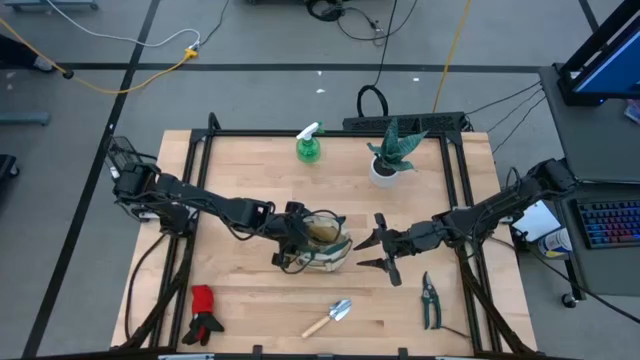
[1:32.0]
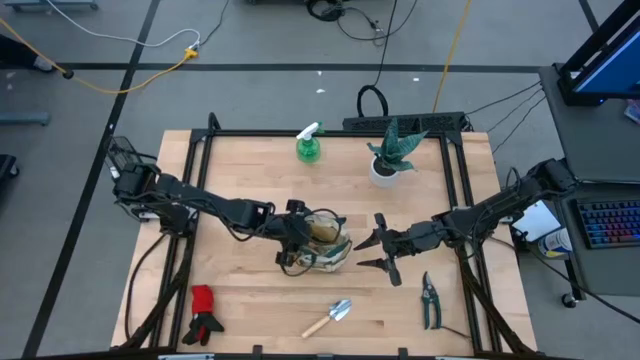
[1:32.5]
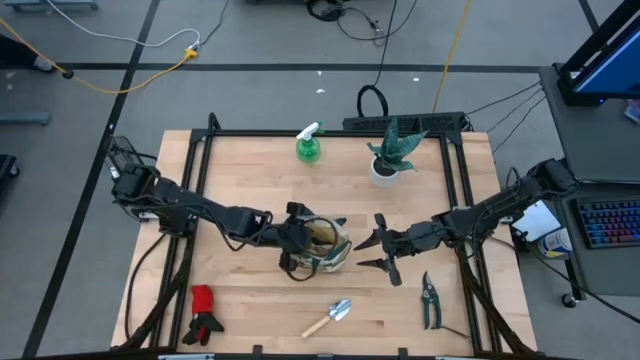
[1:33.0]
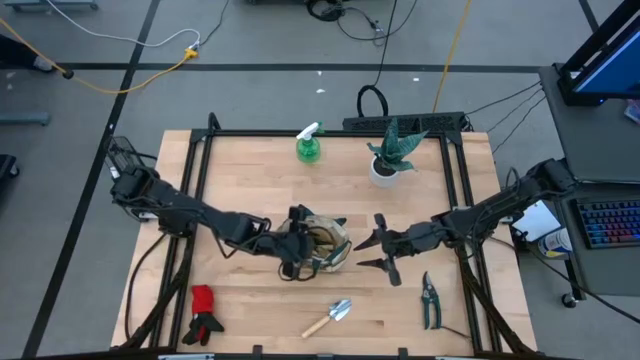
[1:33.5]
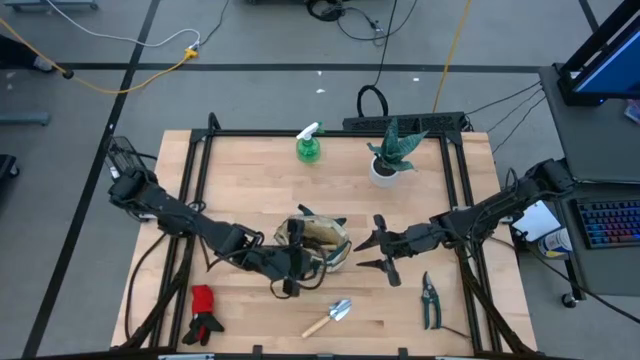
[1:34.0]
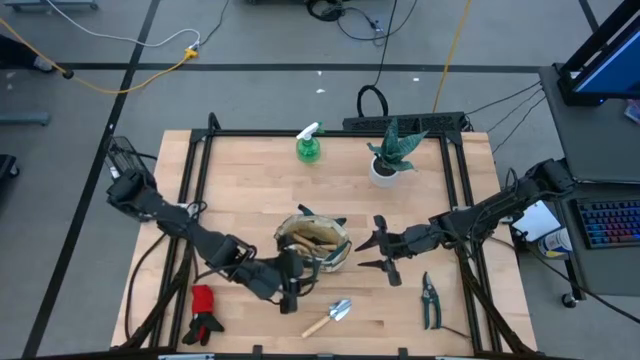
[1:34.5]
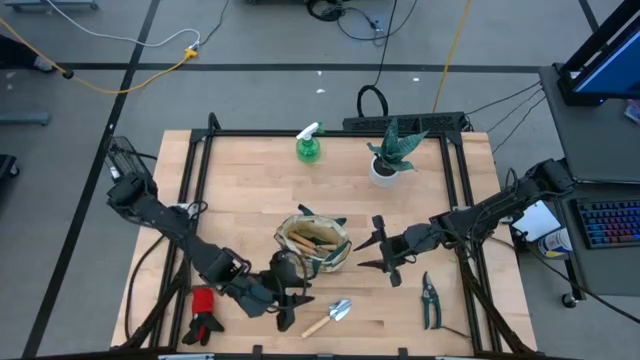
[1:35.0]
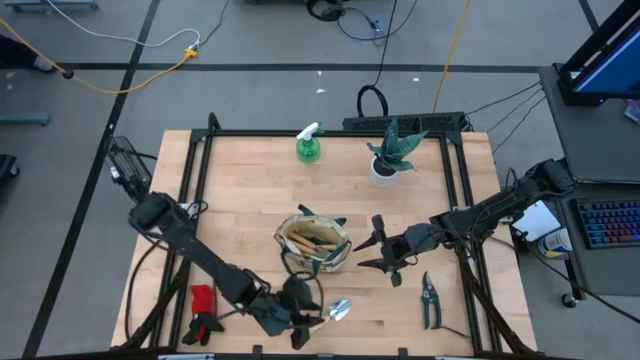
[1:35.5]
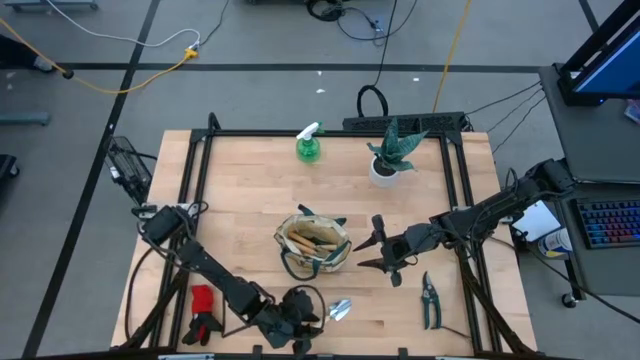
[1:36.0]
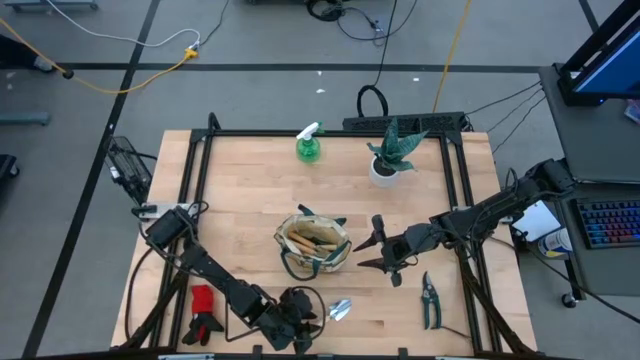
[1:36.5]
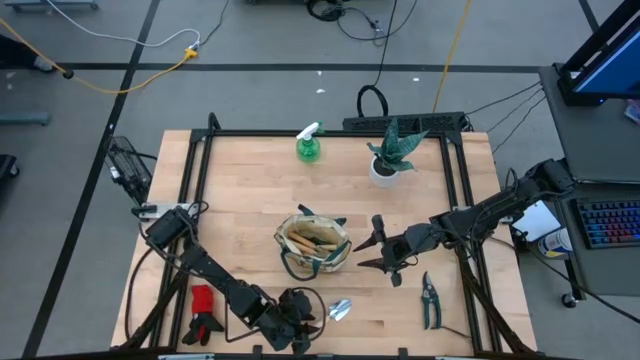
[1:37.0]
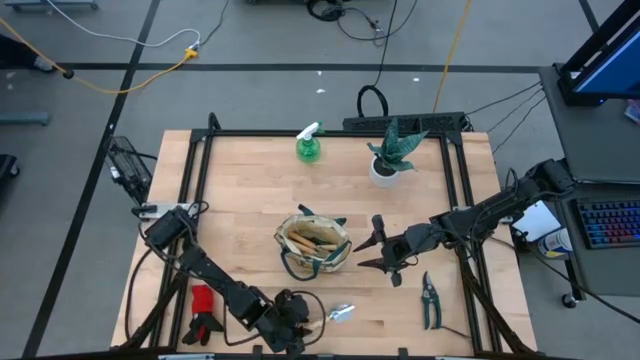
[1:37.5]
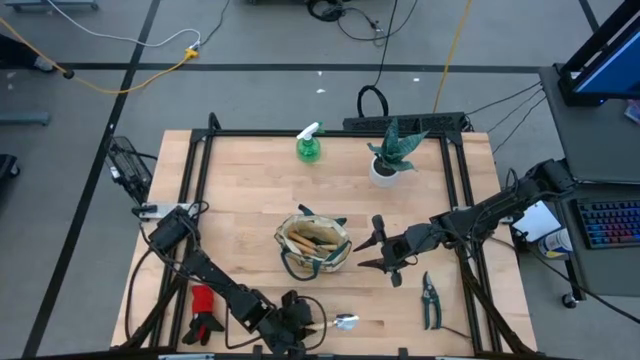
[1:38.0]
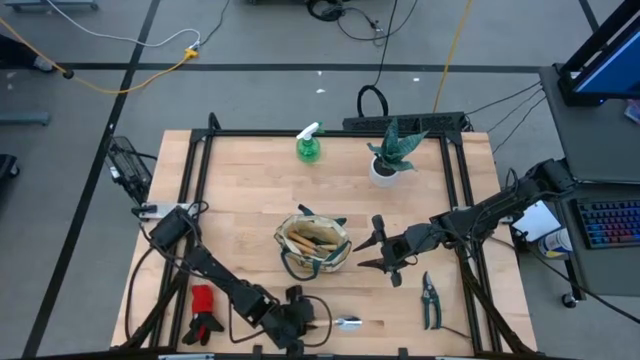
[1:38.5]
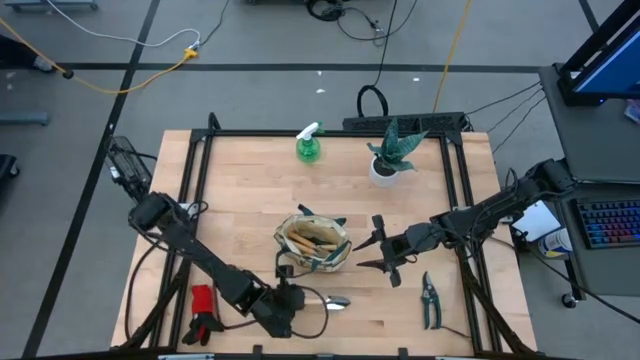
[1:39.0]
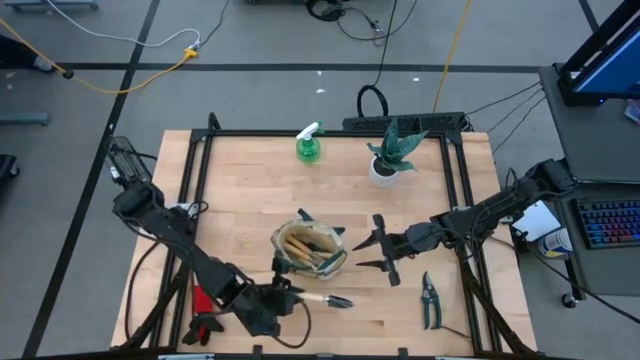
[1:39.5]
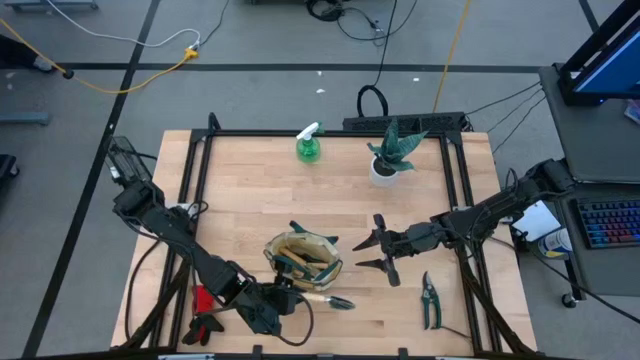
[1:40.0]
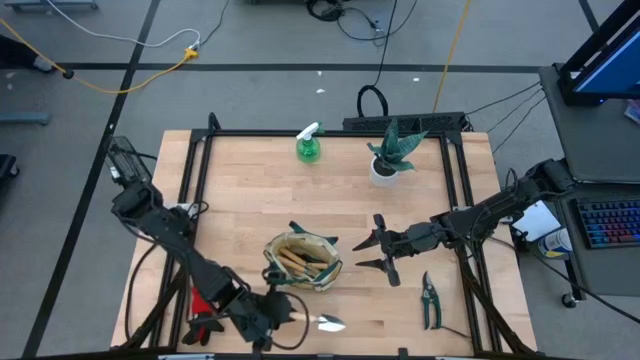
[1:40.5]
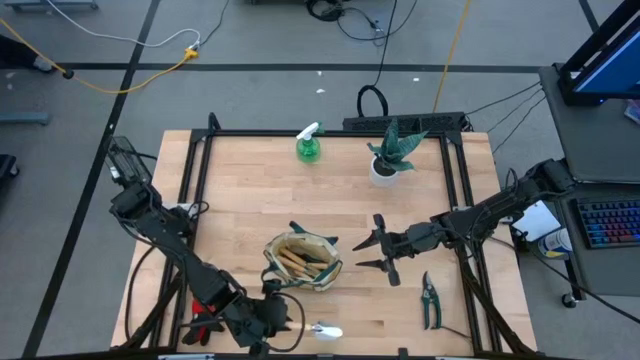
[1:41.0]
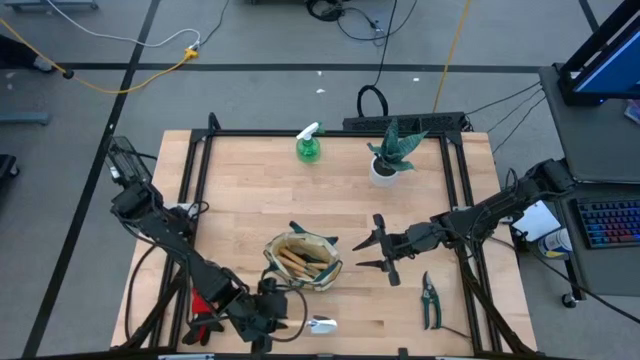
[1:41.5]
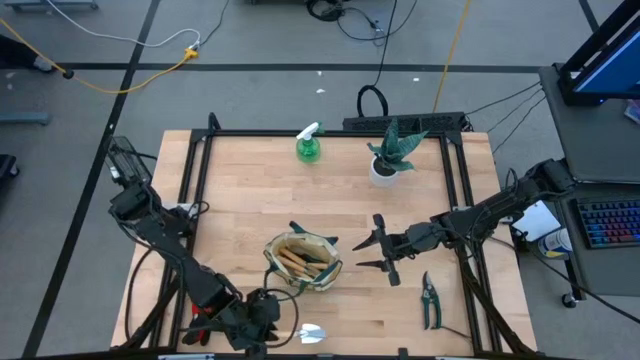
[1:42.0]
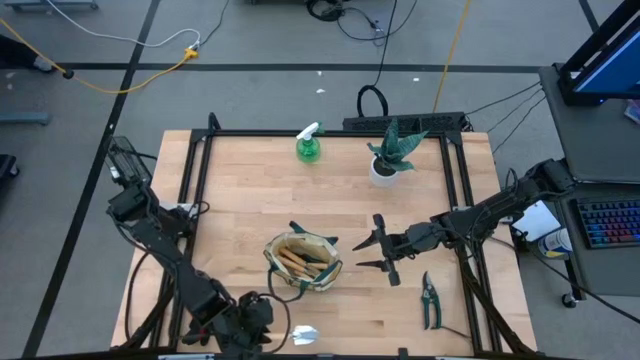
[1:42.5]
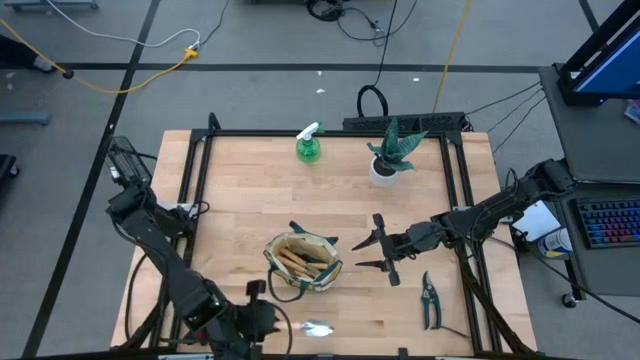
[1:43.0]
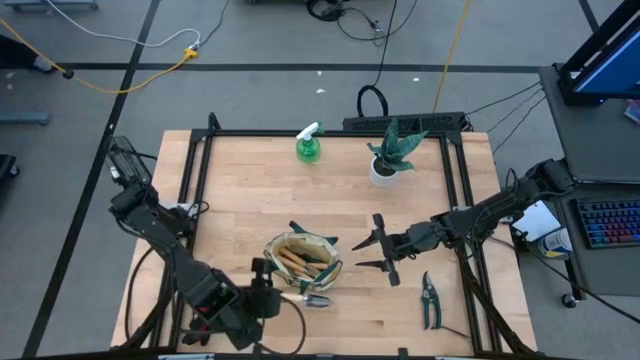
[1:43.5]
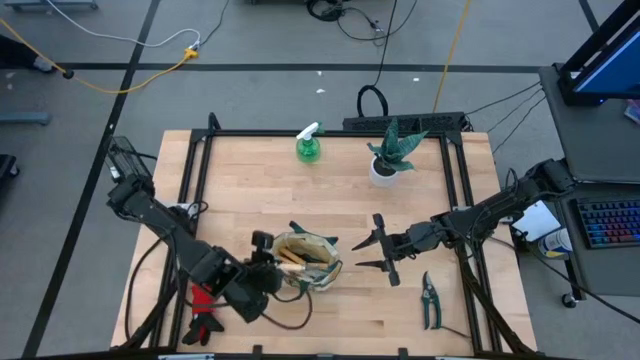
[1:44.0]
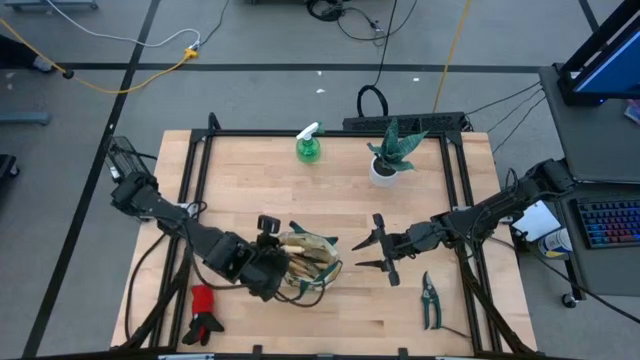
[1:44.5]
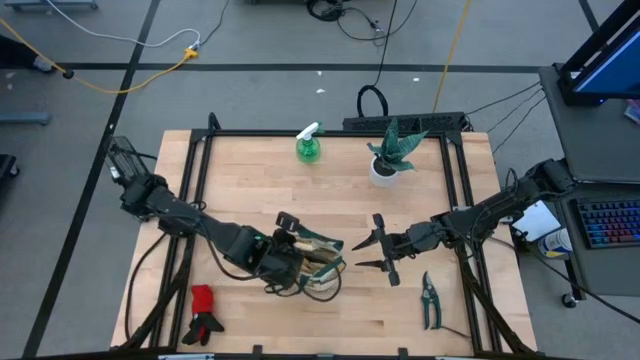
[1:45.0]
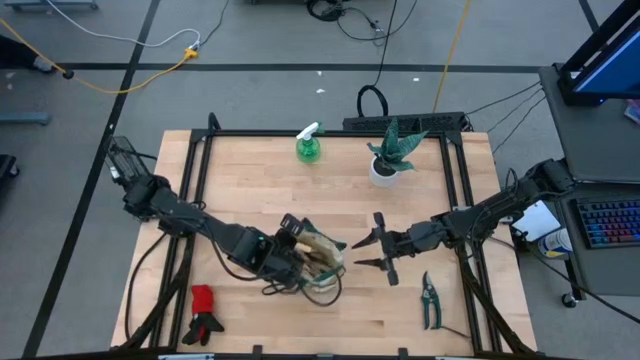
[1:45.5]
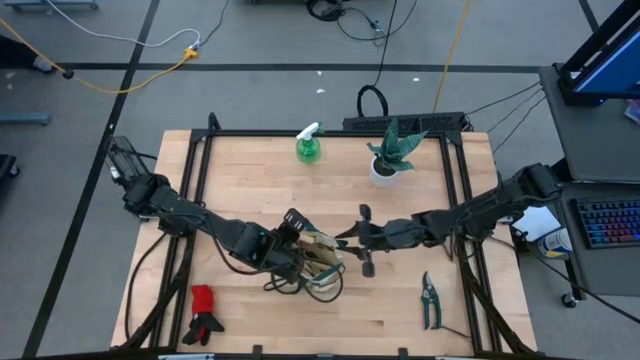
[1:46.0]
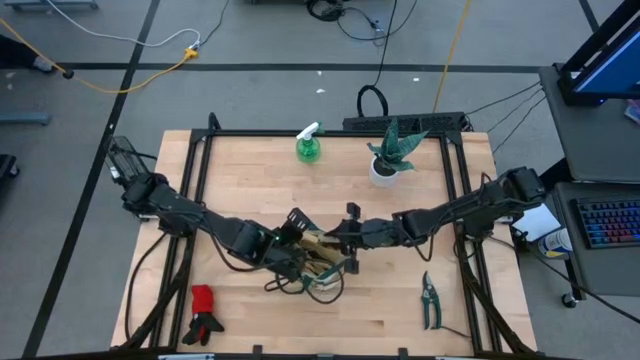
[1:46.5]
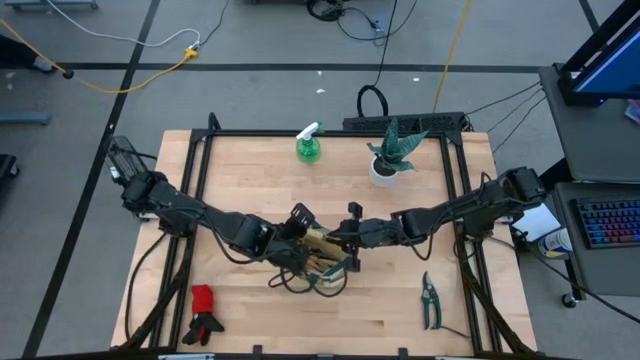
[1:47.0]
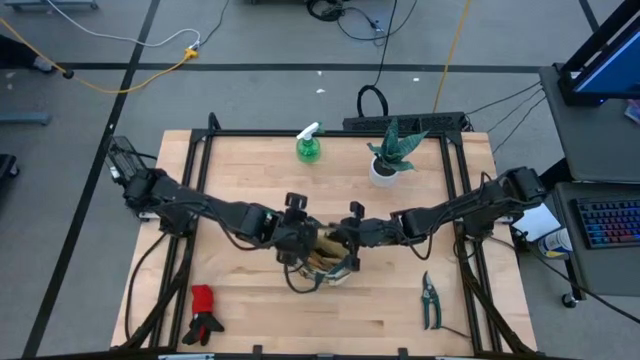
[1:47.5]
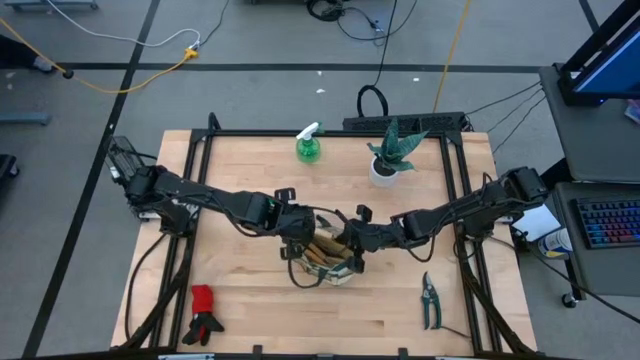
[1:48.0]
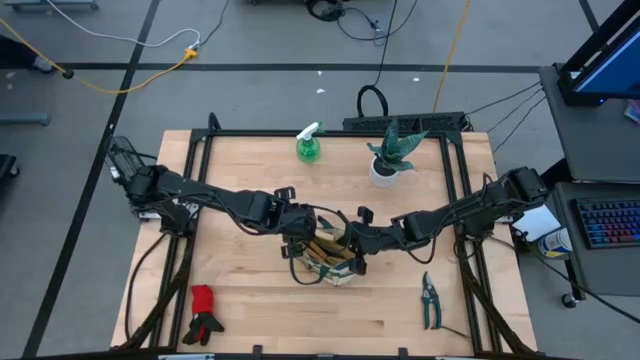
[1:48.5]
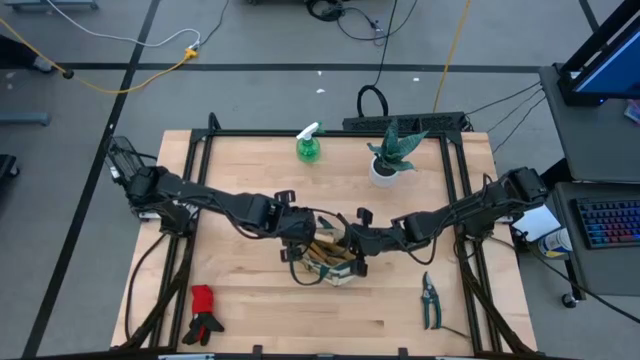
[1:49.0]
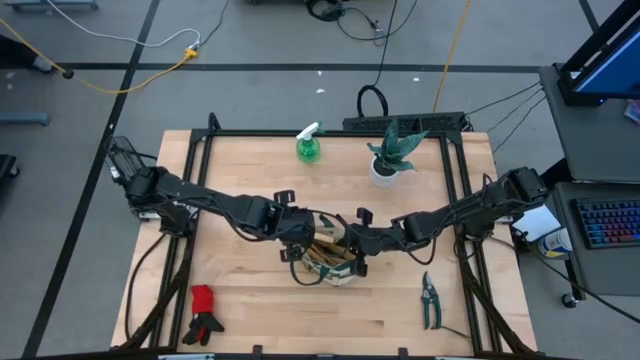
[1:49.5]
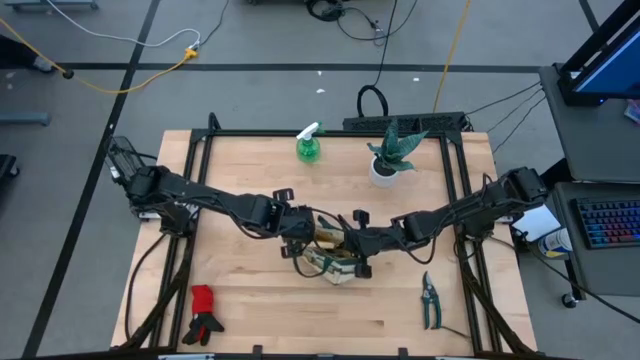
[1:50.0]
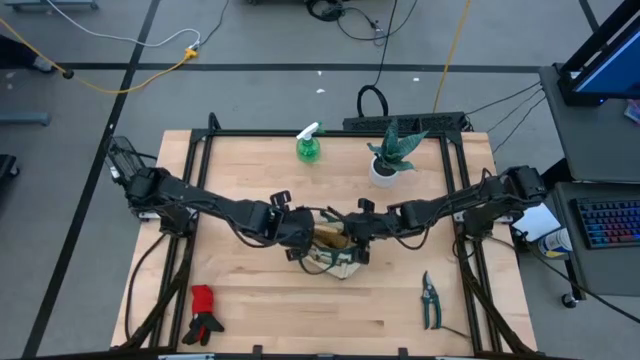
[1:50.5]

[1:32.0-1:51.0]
Task: Pick & Place Garden tools in Gardening bag
Put the brown trowel into the gardening bag

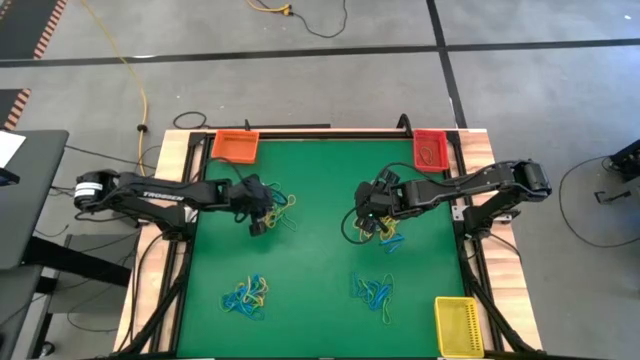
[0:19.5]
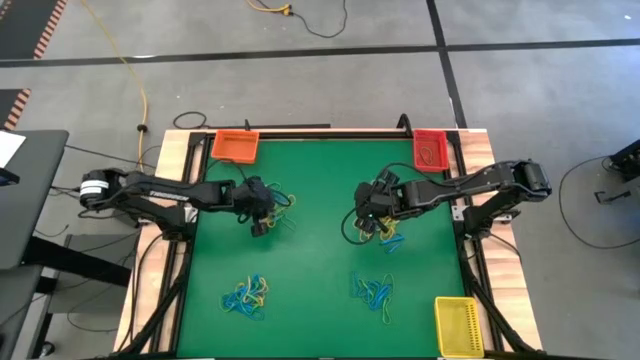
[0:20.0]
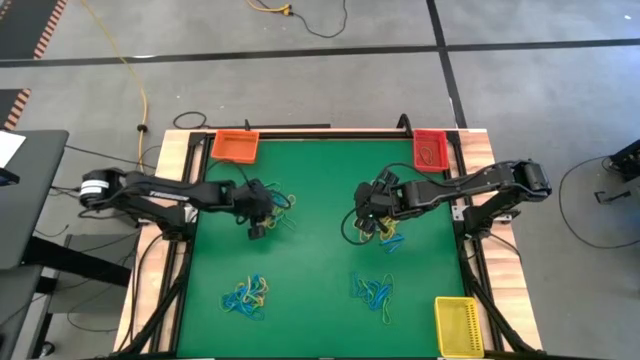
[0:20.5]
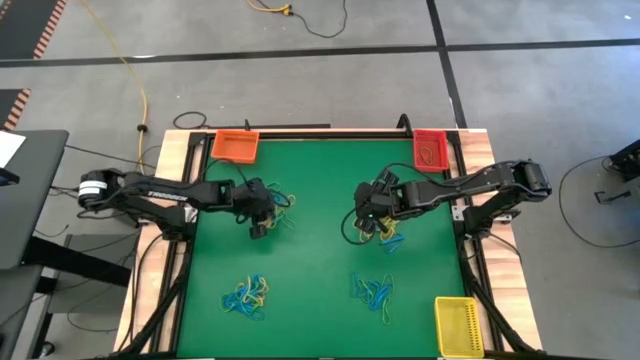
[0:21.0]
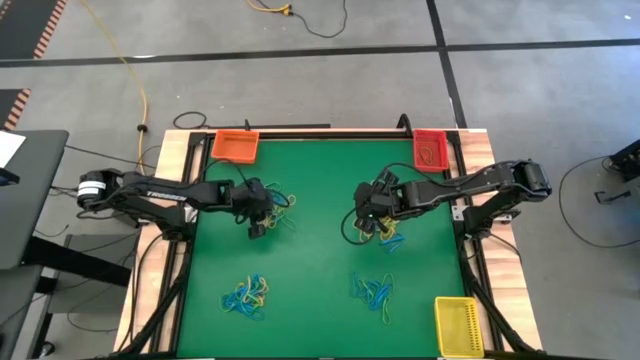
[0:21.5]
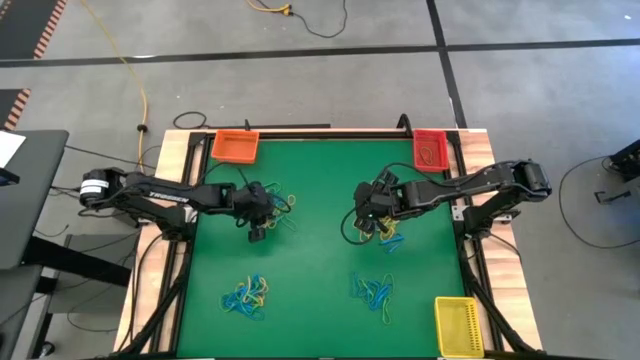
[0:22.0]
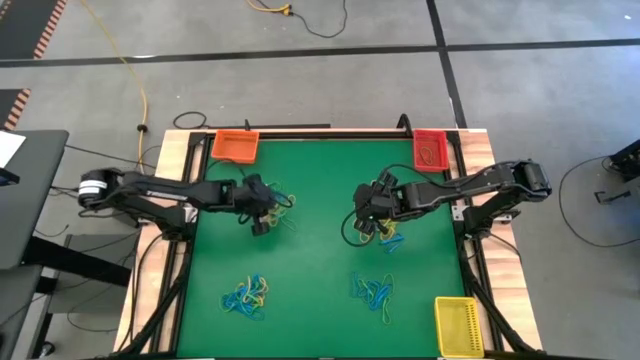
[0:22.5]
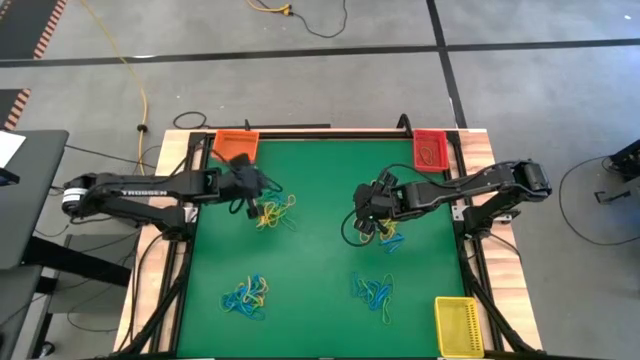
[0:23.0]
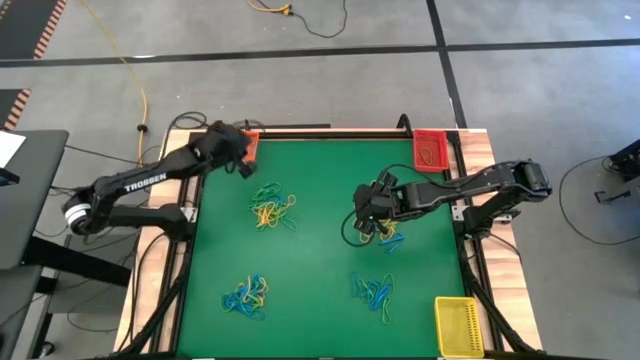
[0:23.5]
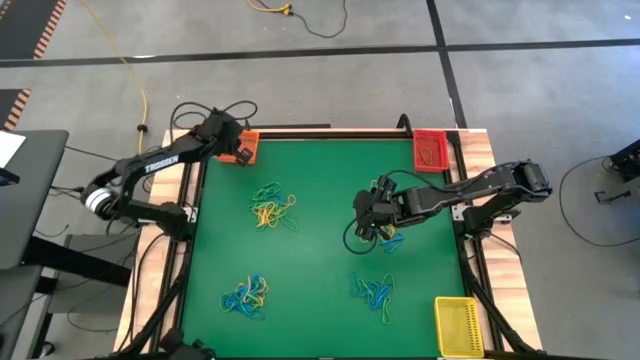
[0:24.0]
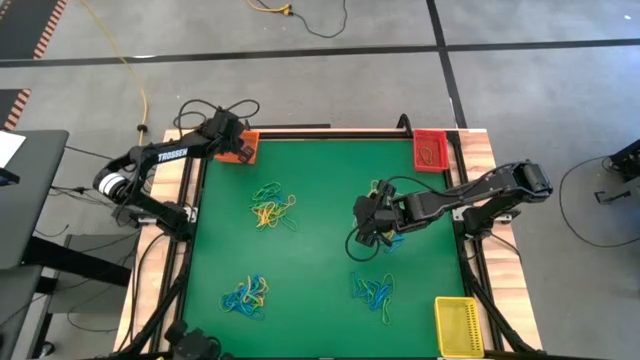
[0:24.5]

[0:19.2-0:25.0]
Task: Sort rubber bands into baskets
Put the top left blue rubber band into the orange bin
